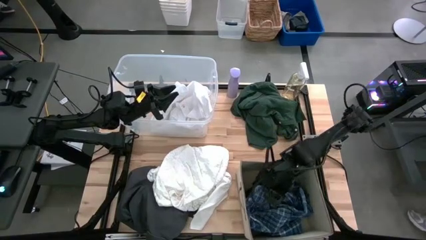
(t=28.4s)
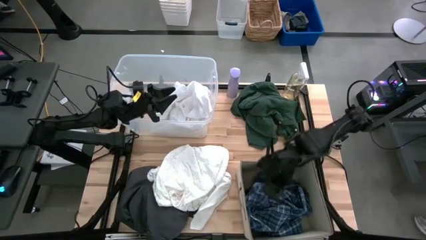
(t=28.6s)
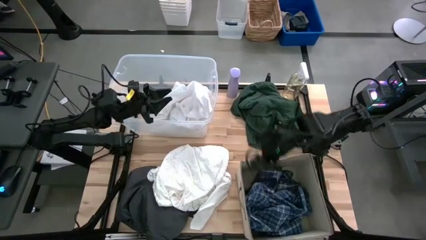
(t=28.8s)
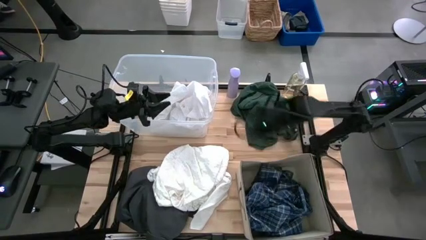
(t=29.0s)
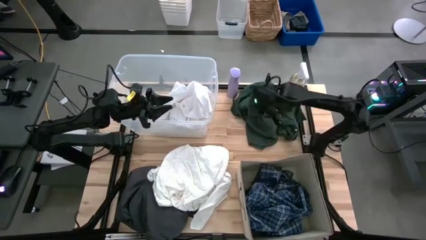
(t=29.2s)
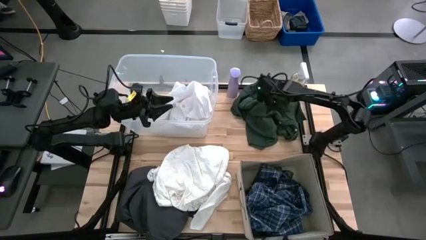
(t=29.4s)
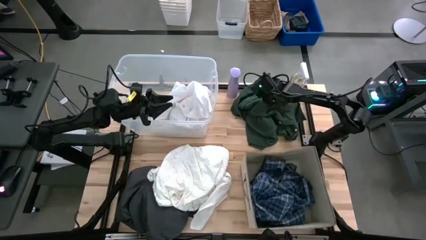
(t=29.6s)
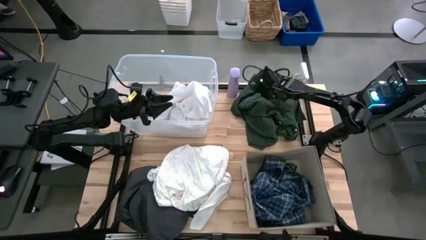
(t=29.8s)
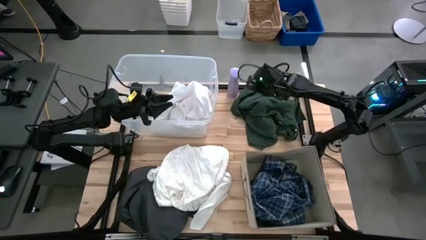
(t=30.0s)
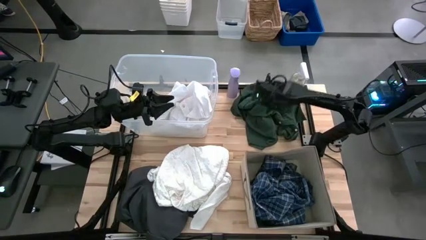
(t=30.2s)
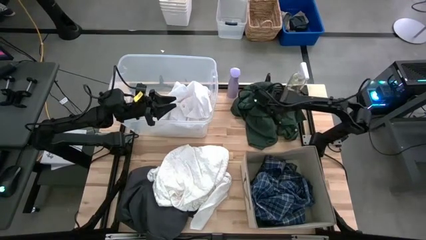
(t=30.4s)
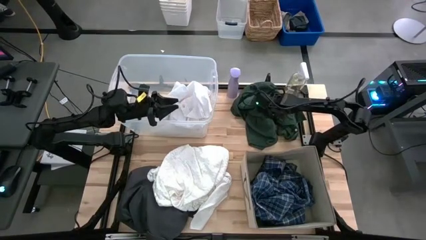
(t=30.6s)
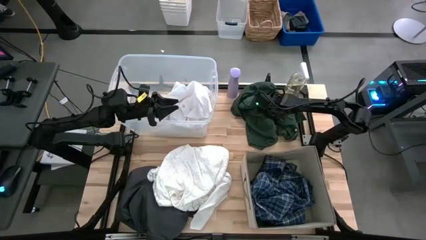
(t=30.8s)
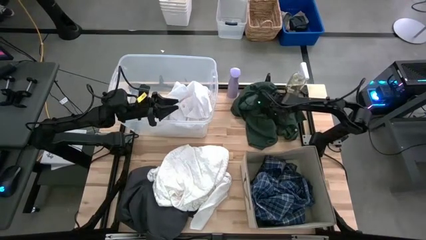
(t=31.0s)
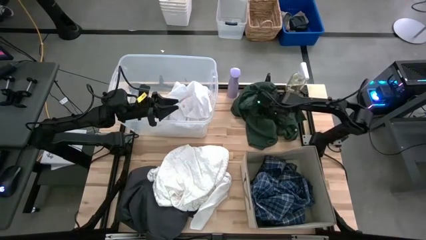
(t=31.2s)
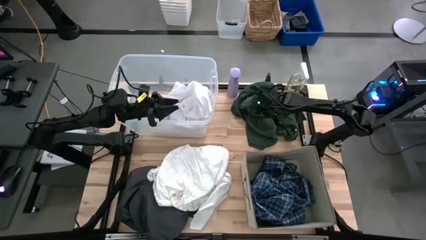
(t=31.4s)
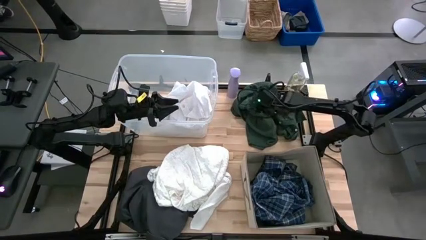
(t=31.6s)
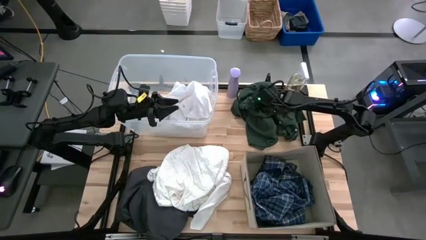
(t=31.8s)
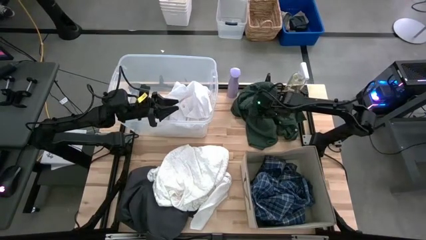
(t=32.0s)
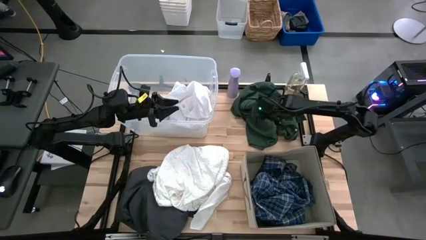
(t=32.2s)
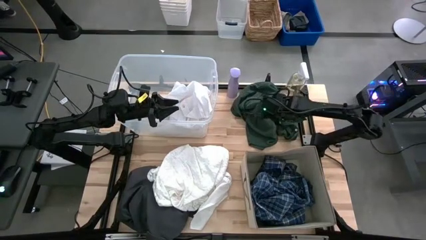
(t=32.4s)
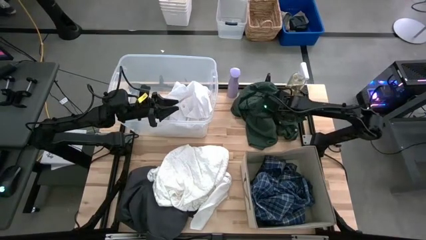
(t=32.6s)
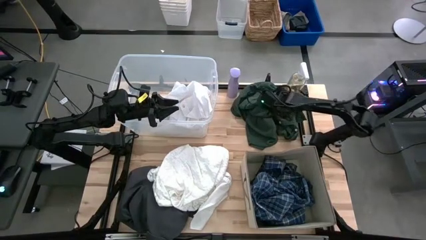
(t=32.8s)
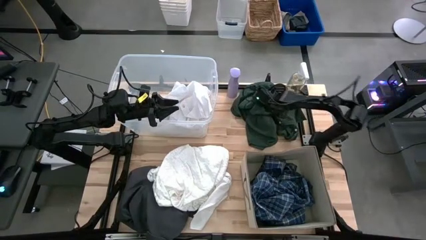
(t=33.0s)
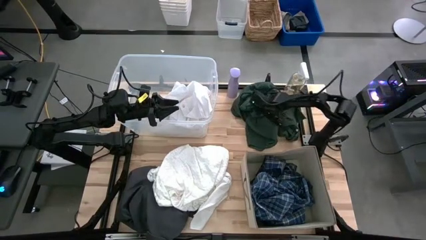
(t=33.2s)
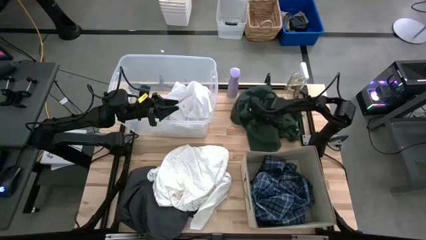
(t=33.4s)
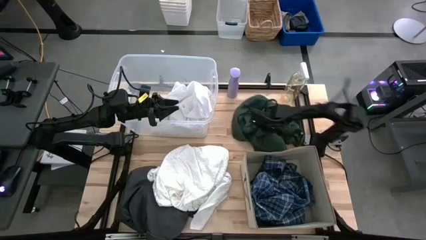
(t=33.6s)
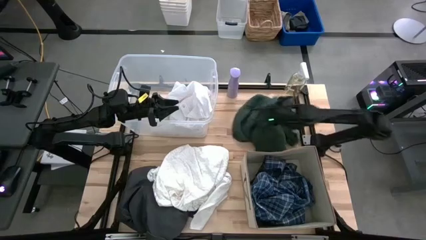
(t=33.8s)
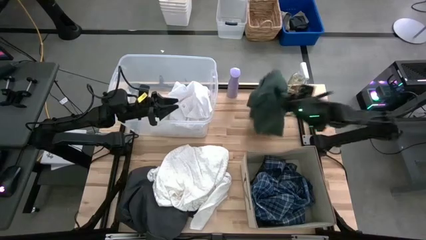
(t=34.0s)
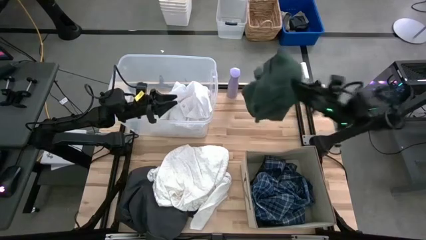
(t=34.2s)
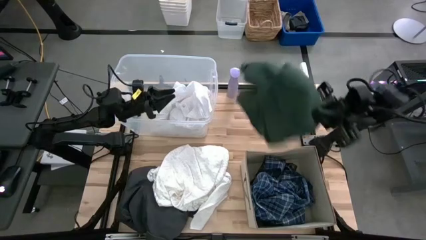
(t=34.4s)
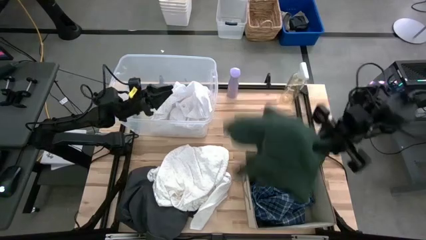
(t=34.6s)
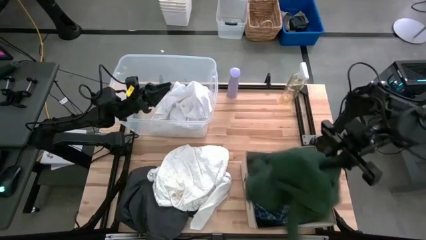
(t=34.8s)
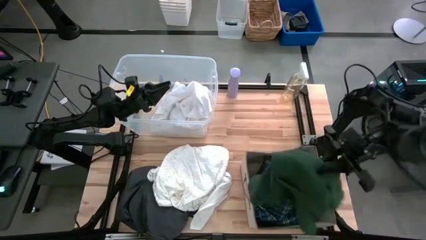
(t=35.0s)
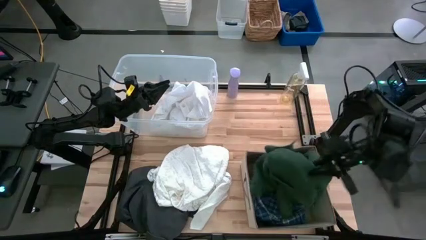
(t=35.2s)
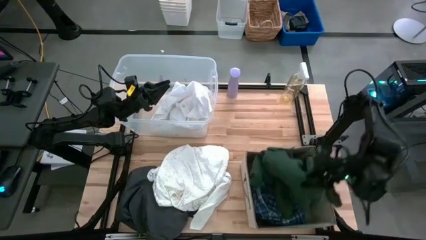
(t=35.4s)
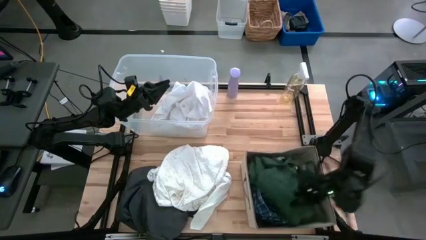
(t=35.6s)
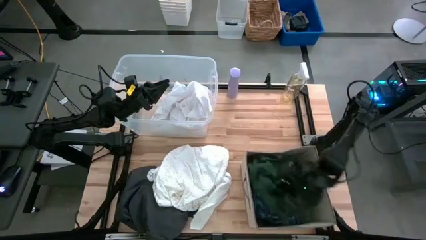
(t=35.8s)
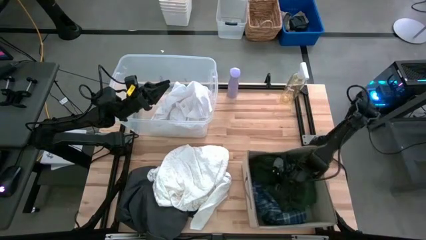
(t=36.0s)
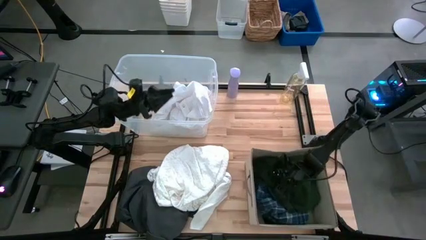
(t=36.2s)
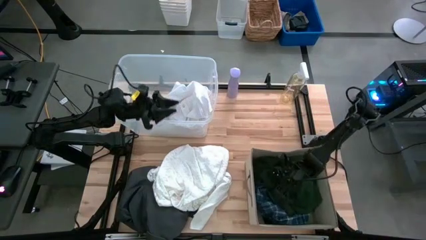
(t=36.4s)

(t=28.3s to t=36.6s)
Task: Sort clothes
Put the green shirt into the laundry bin

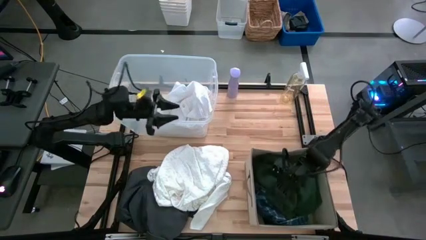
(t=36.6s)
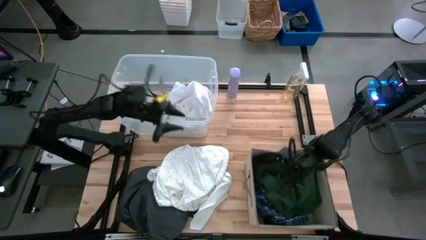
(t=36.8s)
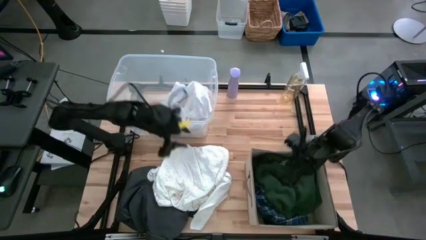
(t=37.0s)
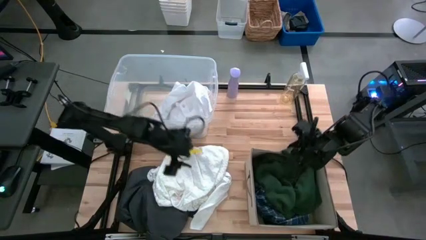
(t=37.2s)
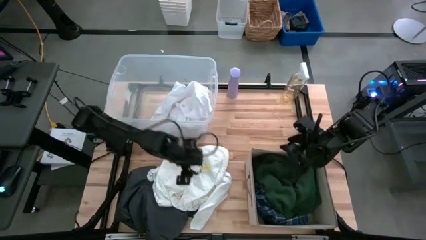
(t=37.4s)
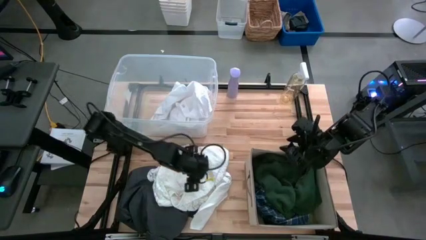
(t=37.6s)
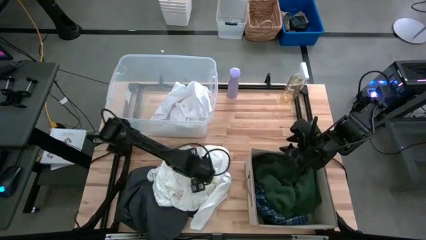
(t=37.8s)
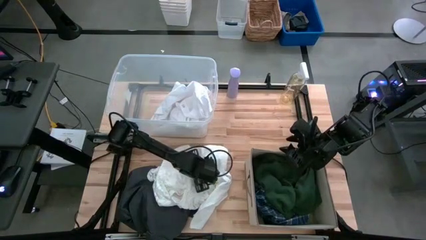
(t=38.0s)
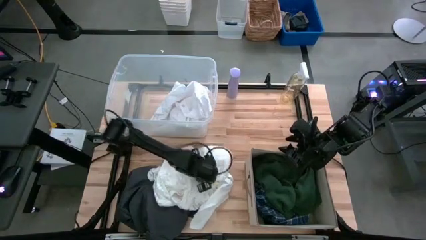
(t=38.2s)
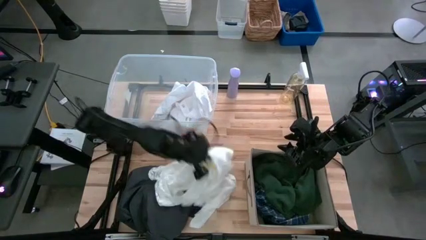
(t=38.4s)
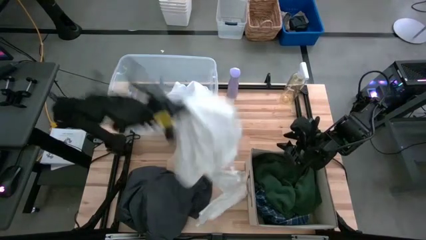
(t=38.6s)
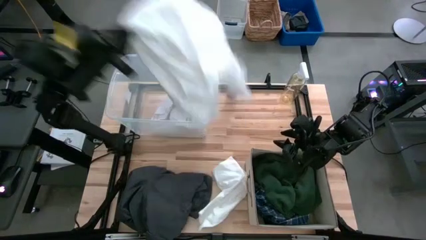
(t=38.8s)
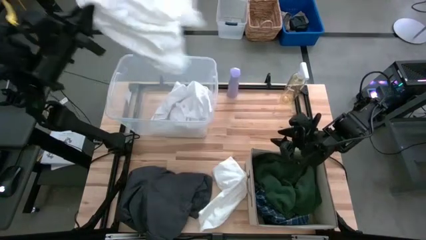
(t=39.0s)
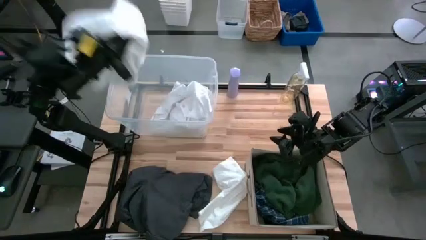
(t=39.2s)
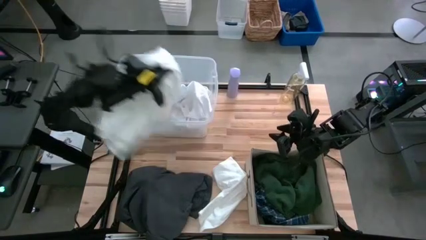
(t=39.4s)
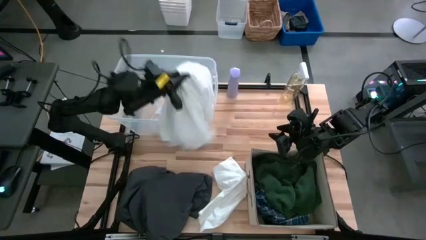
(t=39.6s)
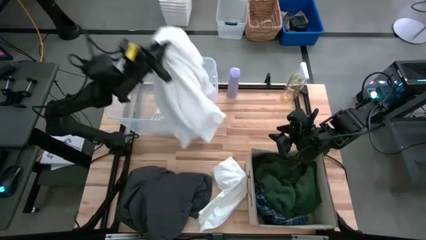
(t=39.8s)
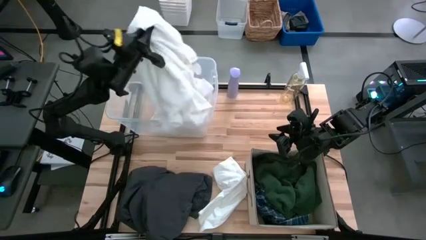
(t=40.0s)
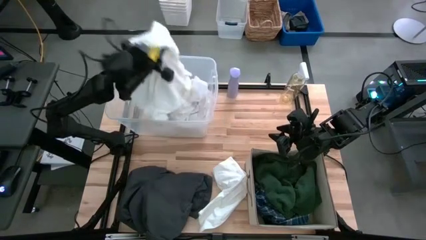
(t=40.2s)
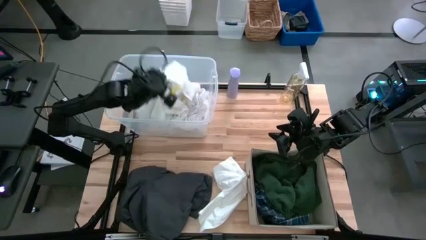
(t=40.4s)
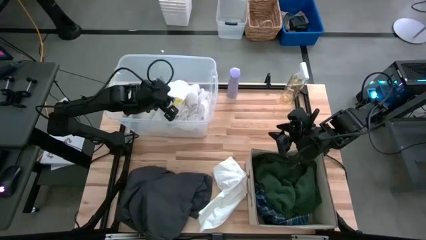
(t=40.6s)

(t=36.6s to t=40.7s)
Put the white shirt into the transparent bin

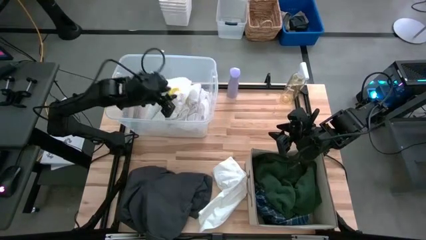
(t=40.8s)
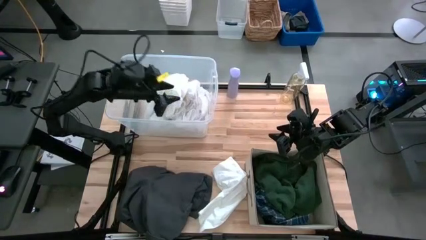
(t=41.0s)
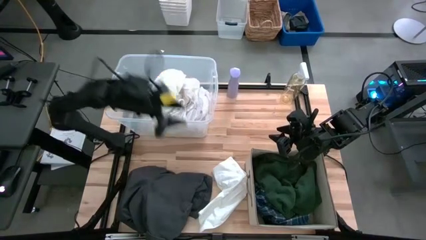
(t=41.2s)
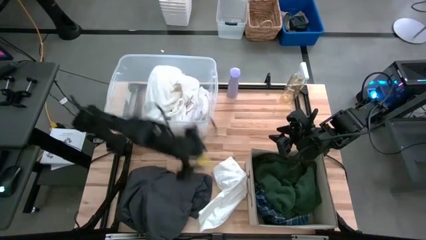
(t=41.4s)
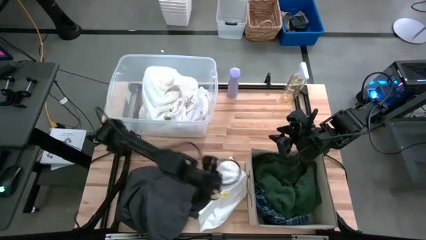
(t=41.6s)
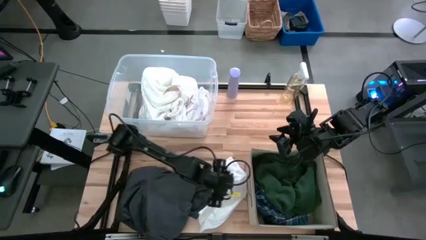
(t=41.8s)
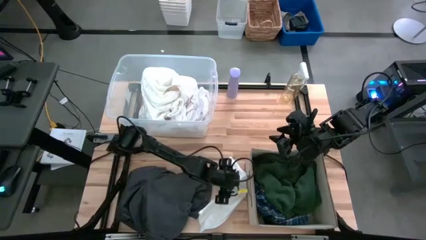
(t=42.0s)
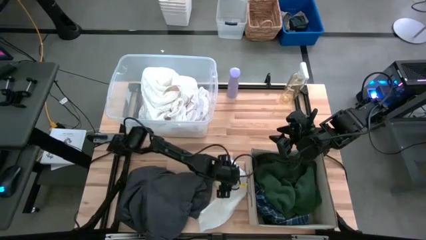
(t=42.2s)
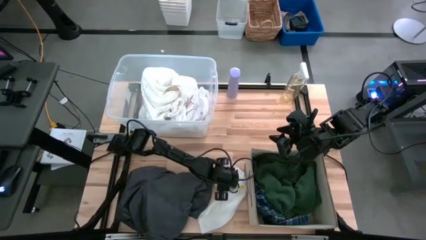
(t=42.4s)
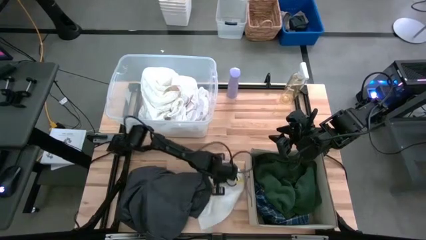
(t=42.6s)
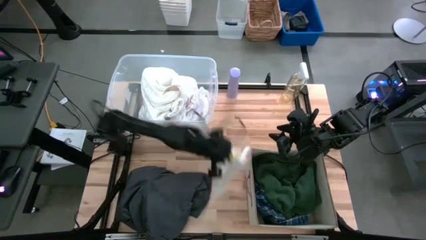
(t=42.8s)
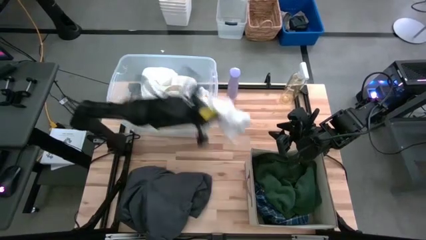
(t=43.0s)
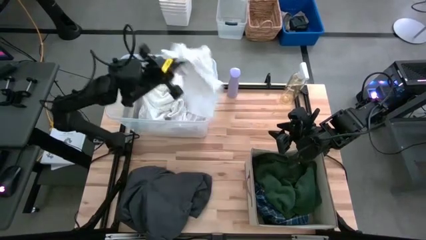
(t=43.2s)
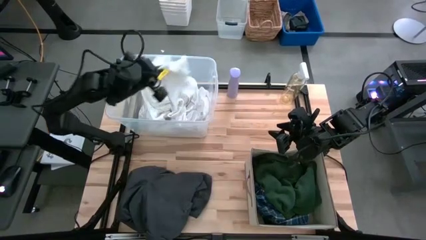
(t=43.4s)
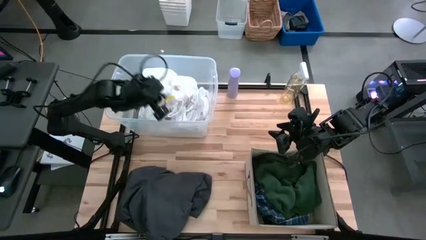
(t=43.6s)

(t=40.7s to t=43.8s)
Put the white underwear into the transparent bin
